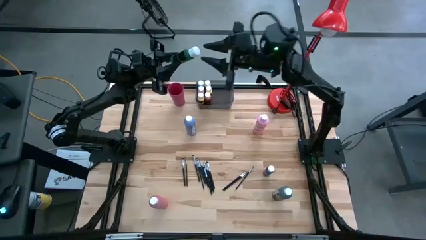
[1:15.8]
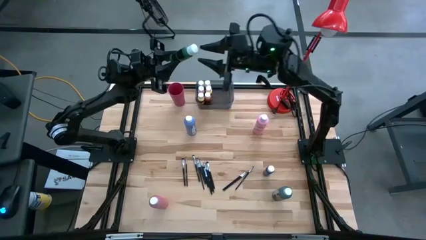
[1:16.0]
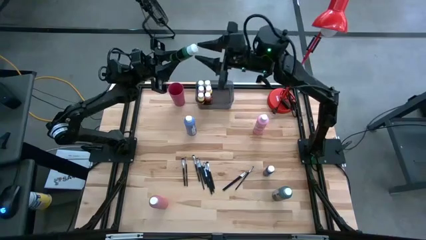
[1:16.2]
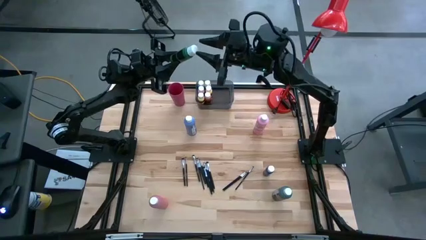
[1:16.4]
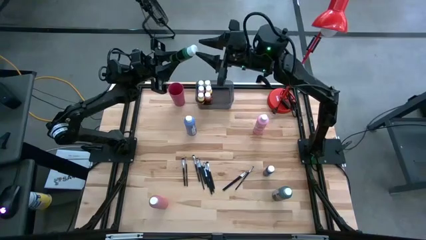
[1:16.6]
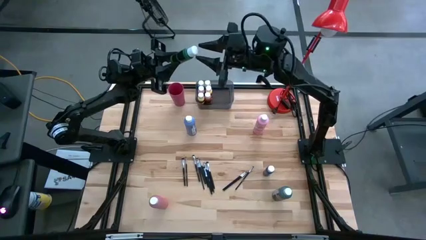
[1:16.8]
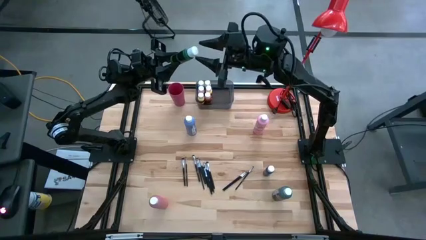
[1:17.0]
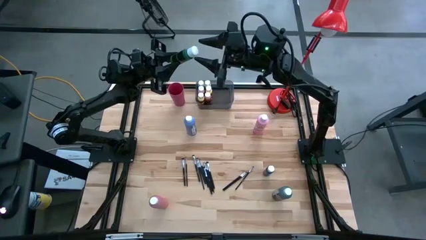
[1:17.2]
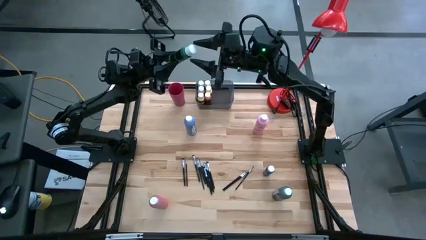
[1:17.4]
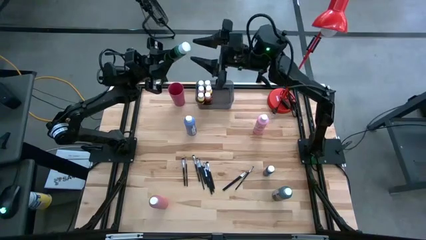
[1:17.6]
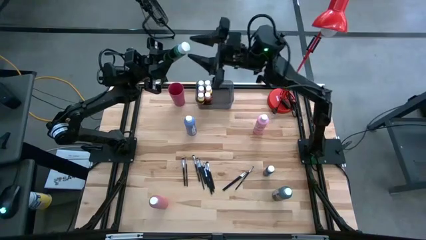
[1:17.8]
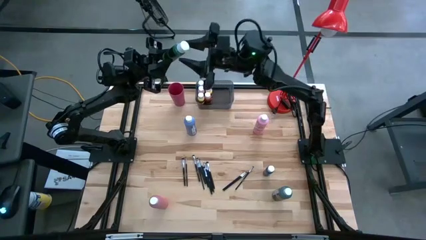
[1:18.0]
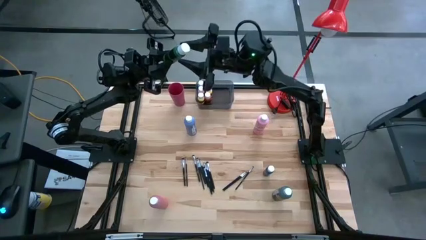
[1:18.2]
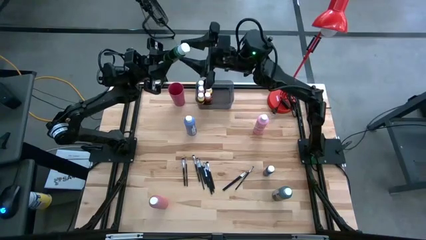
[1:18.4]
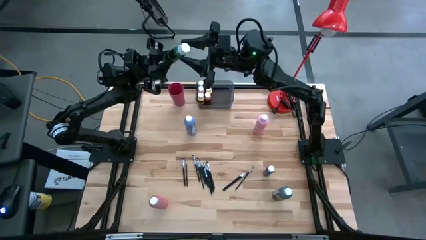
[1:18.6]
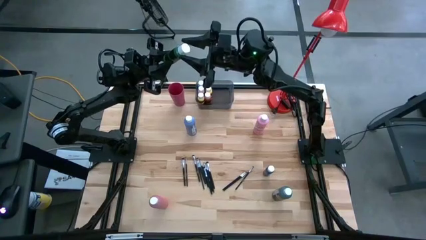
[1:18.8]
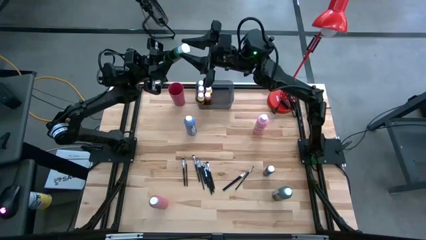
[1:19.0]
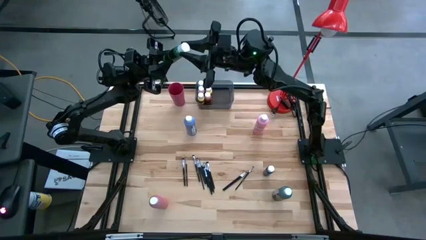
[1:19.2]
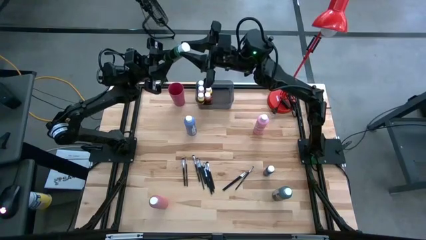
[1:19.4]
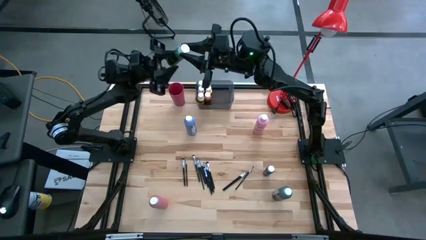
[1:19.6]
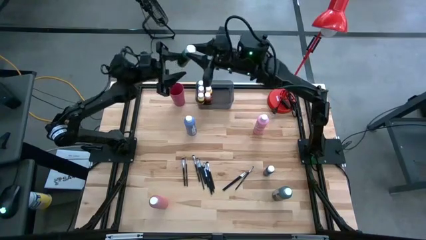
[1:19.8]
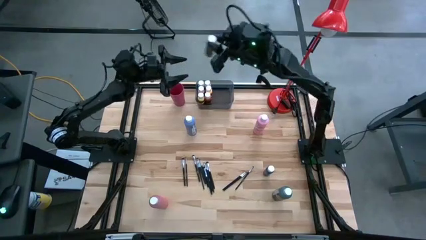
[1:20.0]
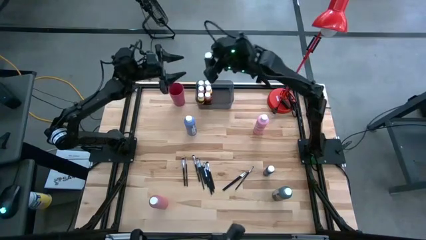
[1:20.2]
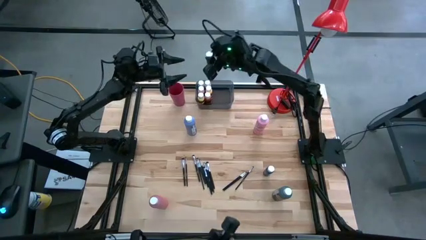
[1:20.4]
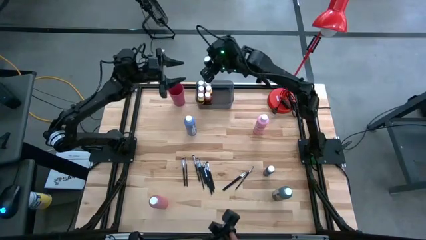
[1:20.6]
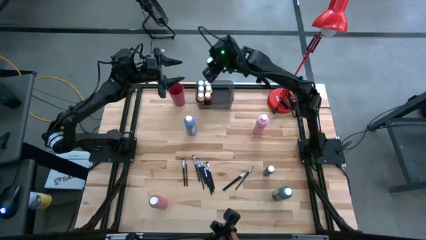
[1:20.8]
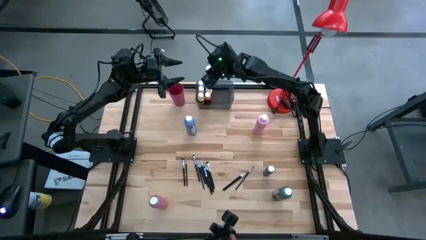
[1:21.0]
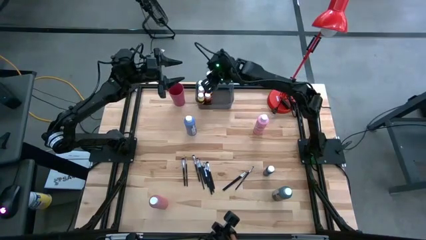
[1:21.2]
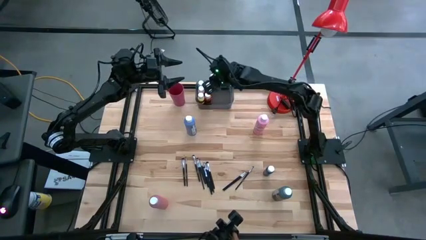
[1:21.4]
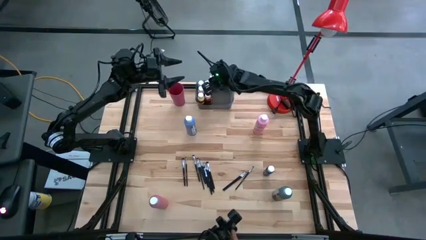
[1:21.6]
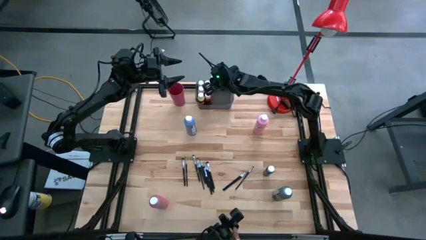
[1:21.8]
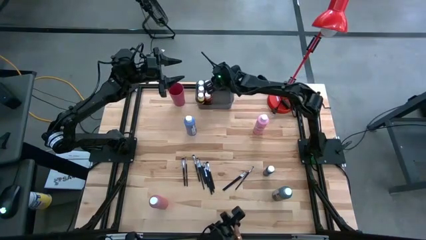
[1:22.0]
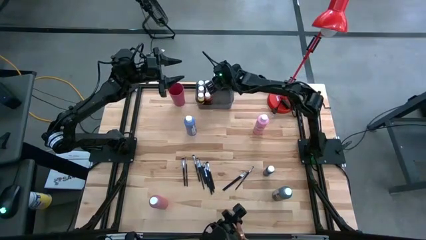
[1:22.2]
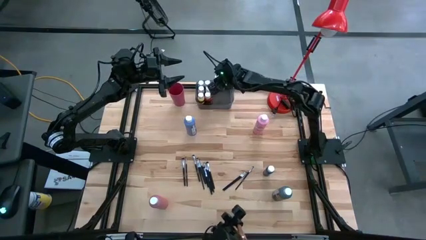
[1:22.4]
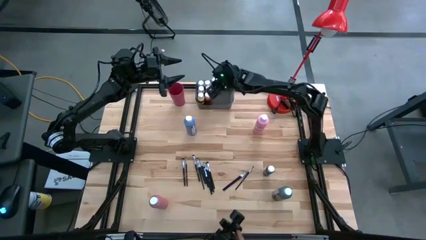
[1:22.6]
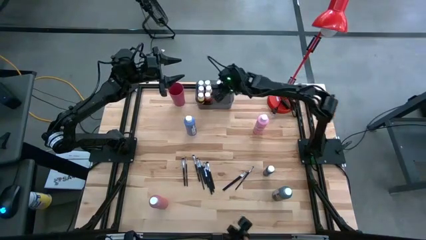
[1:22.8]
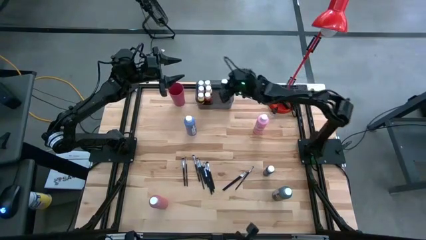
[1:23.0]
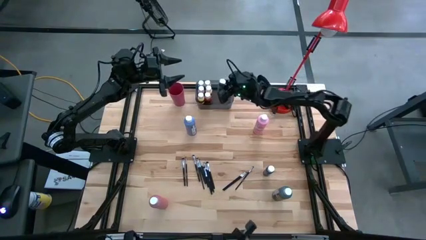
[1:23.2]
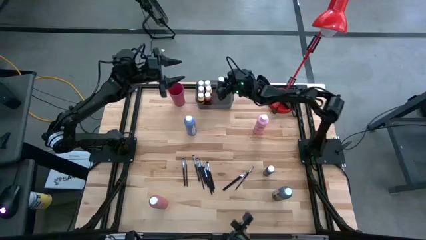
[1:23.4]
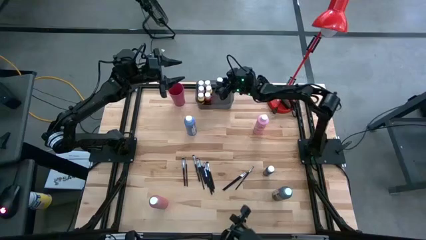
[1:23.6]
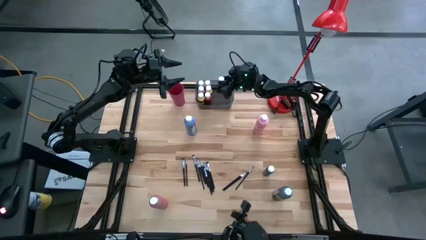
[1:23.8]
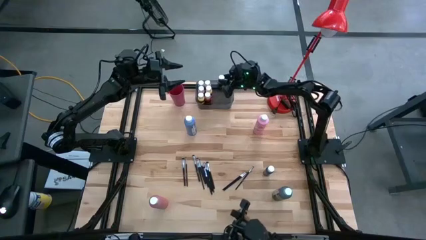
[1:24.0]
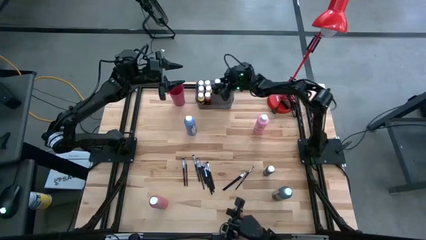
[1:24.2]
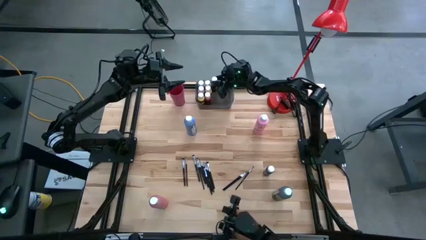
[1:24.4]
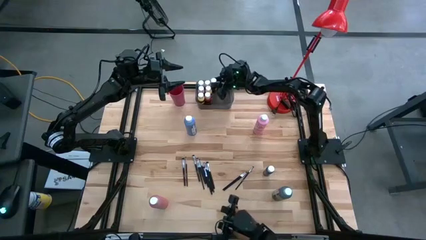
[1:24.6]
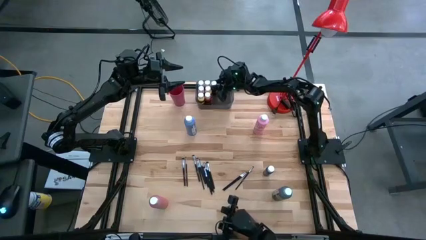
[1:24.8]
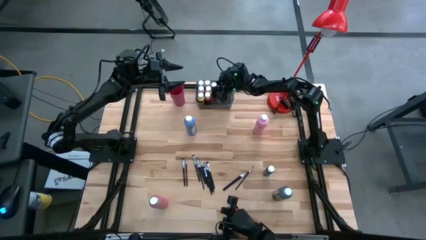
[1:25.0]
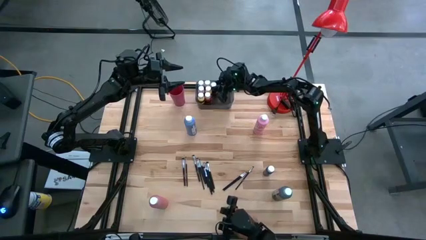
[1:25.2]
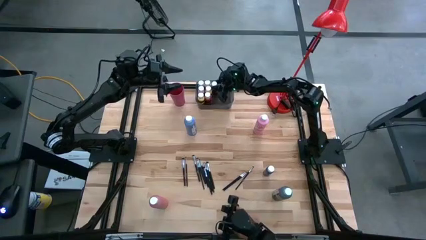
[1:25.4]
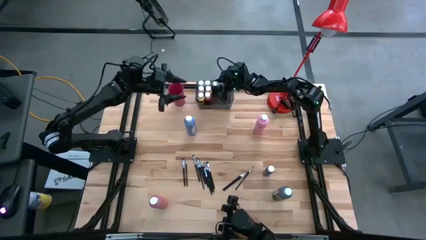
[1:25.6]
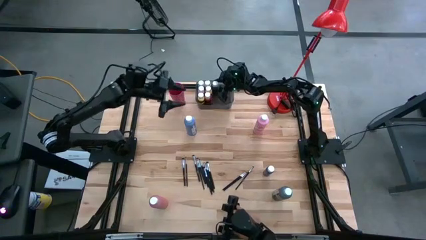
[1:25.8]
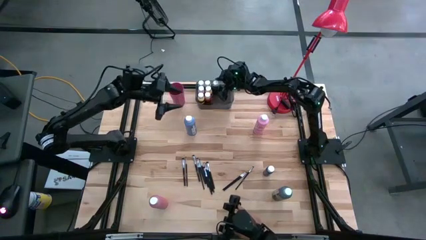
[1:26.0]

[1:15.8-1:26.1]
Task: Pick & Place Paint Supplies
Put the green paint bottle into the black bin
